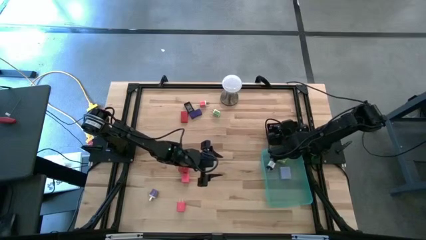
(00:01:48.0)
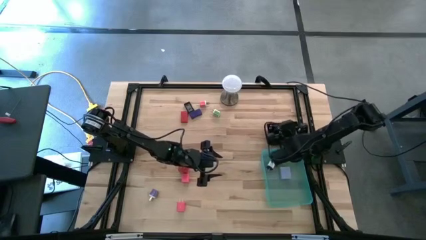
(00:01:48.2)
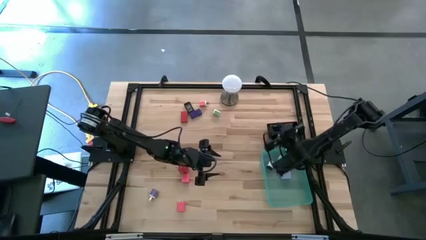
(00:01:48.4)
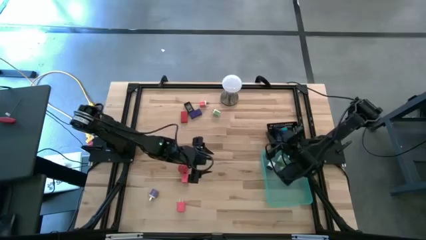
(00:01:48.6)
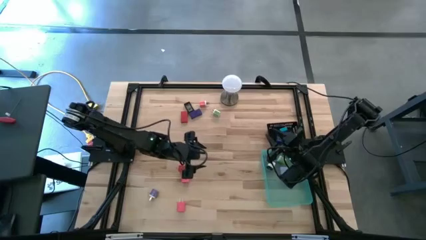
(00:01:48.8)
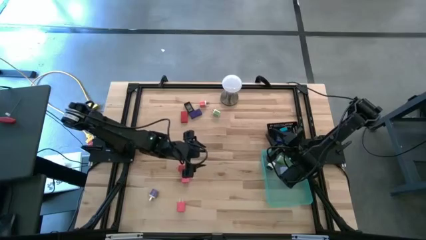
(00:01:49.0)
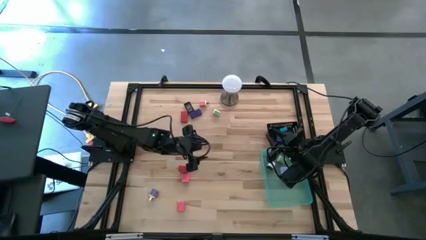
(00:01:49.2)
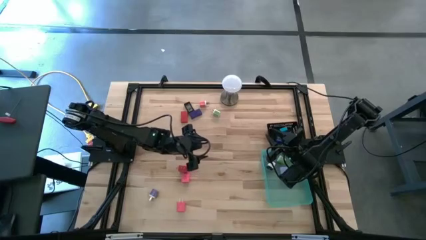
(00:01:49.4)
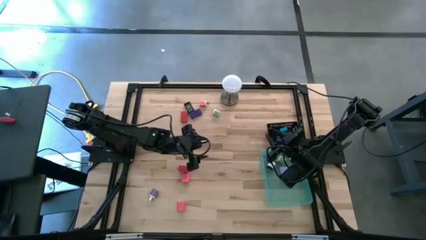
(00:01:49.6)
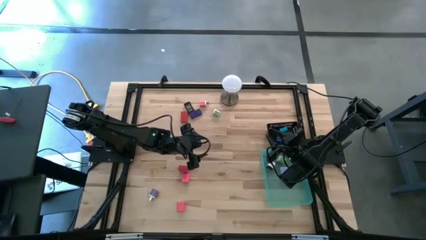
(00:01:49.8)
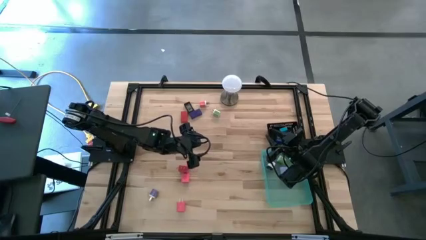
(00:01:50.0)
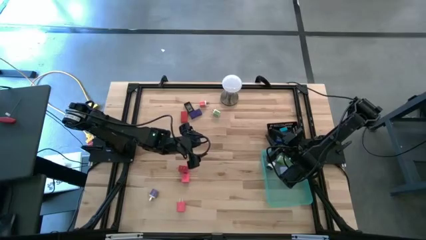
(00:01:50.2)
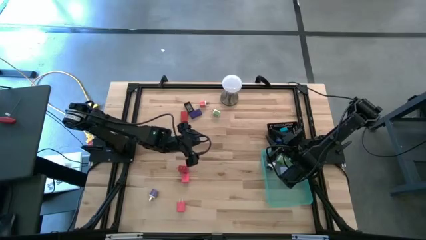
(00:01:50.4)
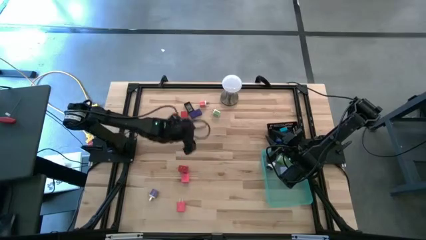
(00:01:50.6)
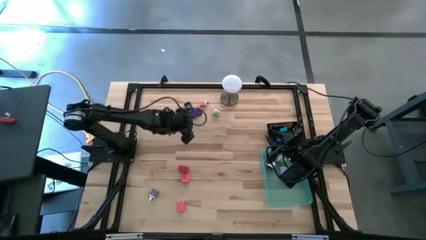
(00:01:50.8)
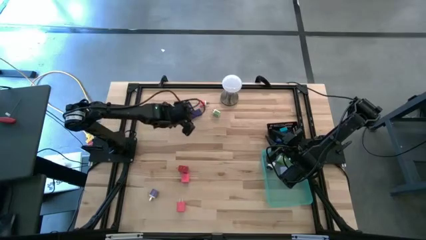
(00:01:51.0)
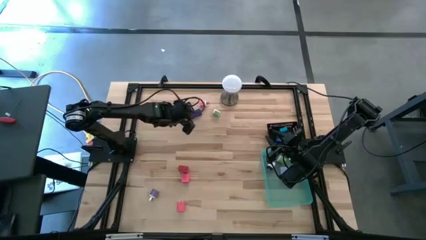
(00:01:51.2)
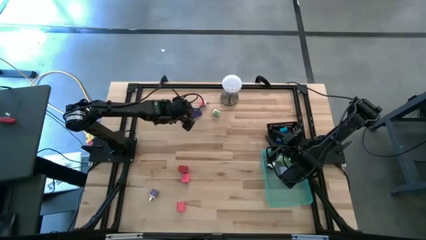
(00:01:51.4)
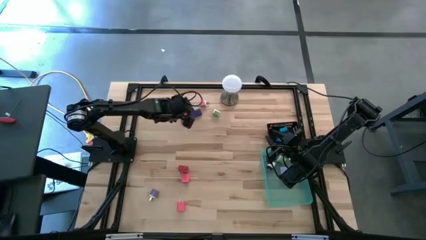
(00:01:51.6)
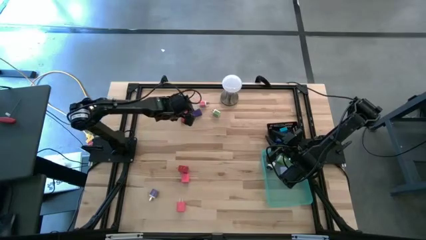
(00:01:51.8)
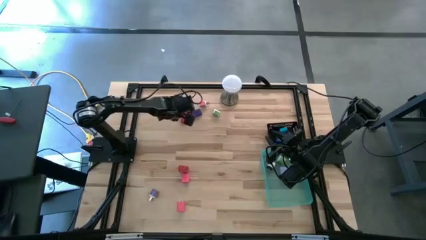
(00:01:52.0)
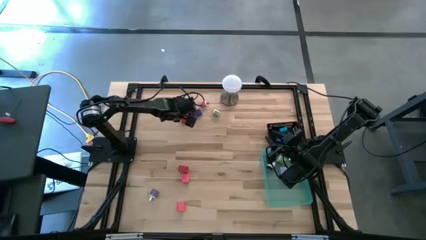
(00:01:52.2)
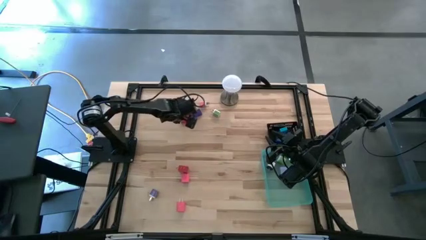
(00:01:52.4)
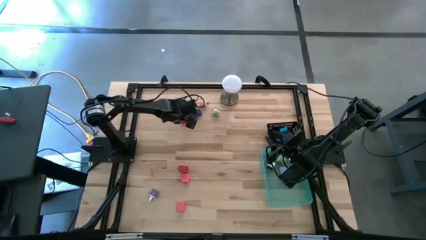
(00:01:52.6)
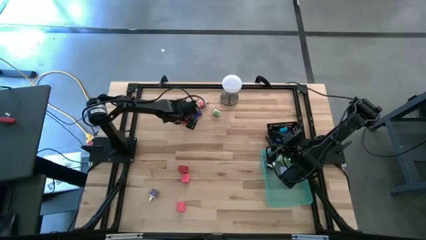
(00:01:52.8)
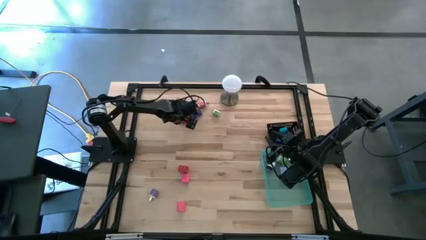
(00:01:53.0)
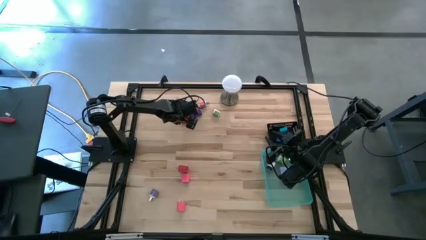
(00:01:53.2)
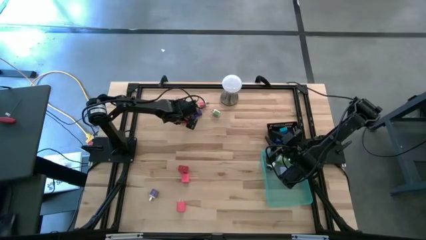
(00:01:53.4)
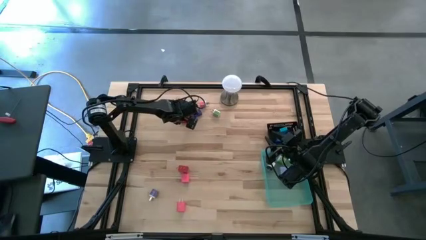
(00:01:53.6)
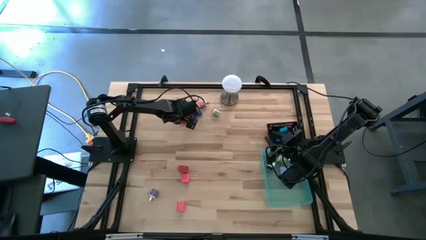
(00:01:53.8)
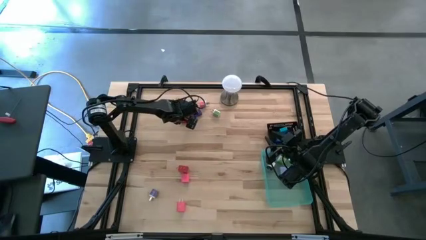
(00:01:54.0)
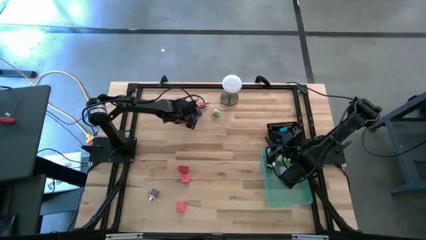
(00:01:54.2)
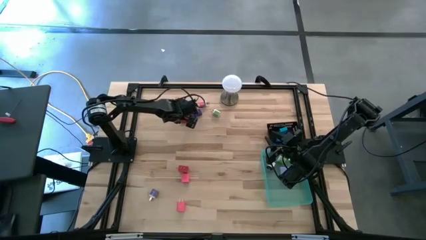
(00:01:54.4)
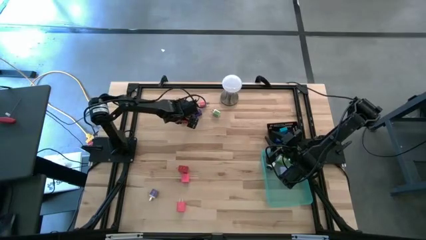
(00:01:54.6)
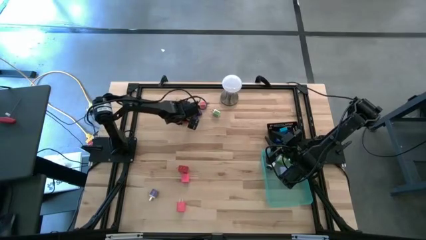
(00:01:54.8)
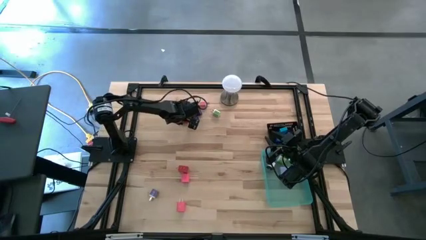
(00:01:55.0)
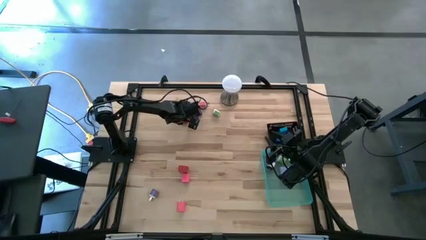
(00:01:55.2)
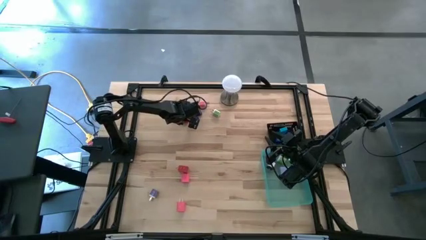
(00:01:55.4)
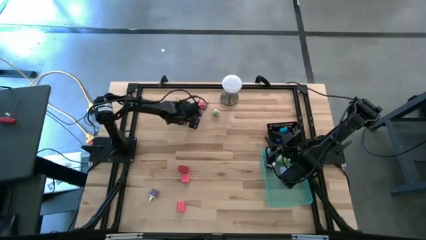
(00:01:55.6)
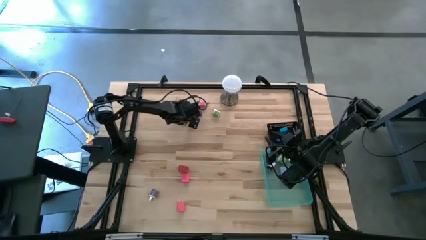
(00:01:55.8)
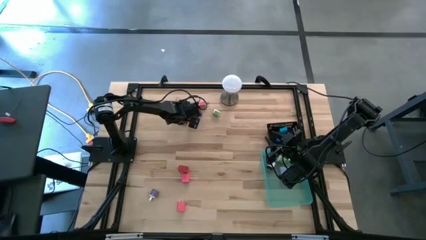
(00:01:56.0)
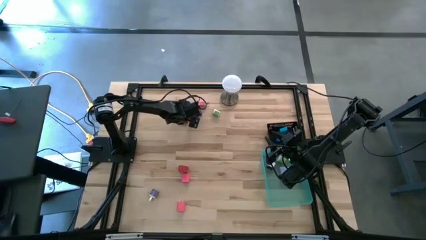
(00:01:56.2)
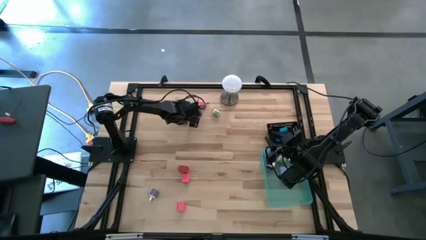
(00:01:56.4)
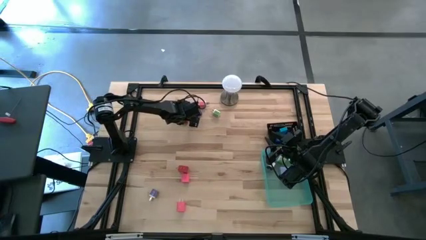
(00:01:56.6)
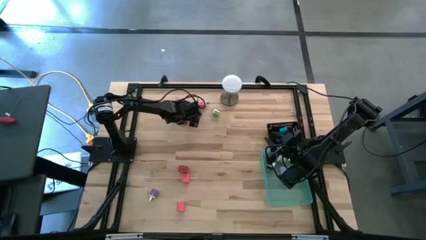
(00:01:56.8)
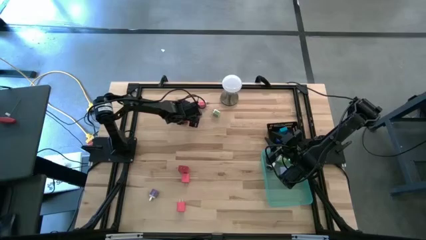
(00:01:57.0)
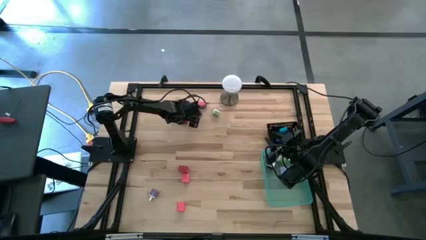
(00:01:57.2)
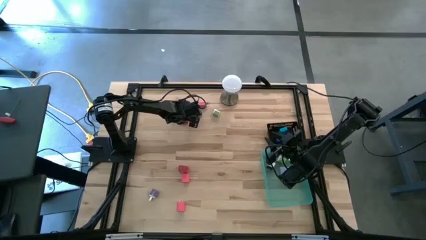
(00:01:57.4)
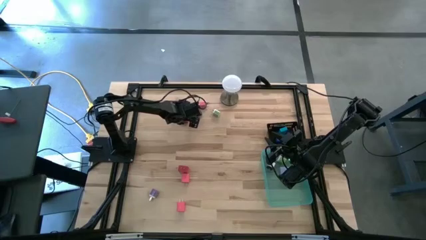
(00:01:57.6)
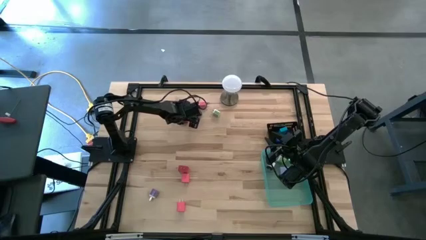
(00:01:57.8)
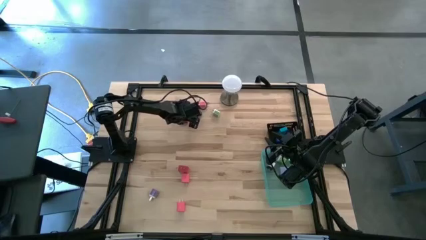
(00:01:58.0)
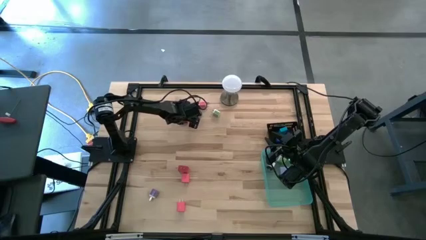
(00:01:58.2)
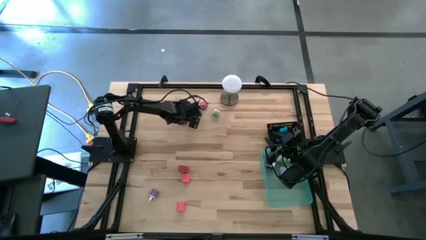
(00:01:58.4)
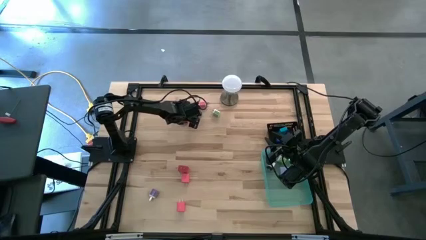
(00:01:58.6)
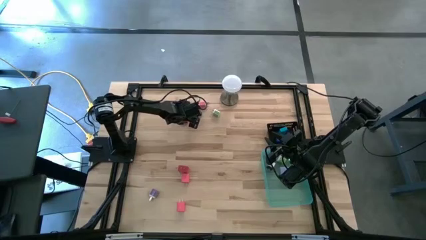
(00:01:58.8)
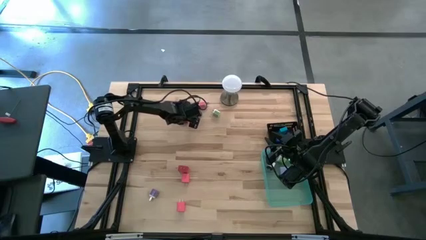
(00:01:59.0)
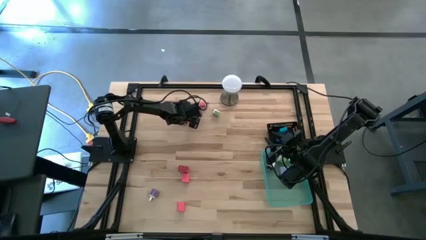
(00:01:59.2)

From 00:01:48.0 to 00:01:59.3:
Task: Pick & Place Office items
Put the red digital clock into the black basket

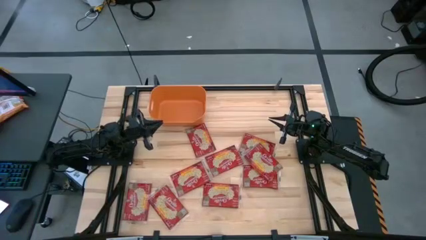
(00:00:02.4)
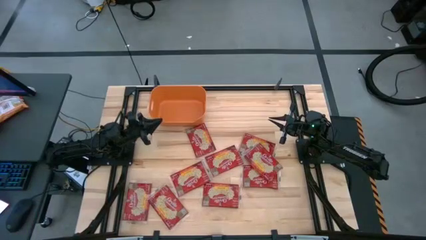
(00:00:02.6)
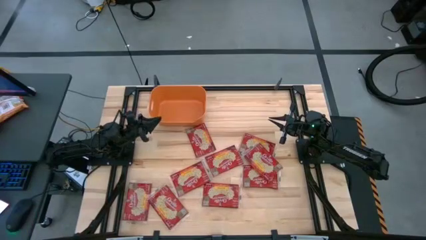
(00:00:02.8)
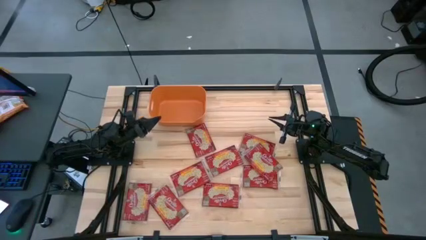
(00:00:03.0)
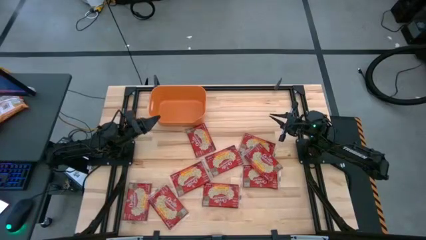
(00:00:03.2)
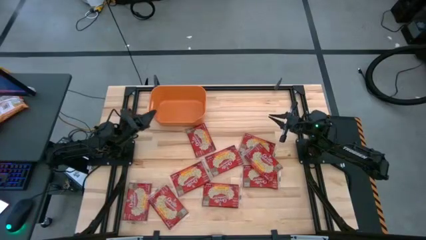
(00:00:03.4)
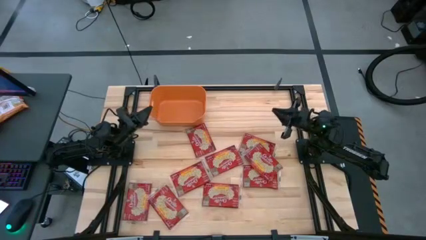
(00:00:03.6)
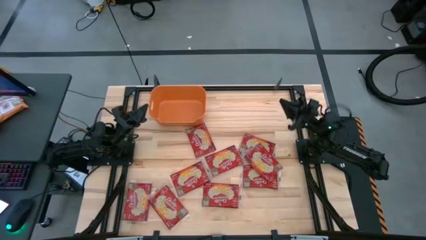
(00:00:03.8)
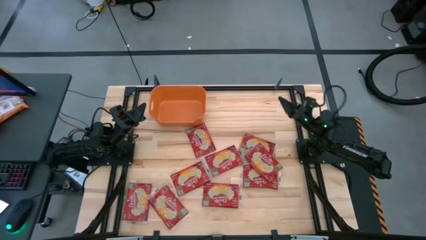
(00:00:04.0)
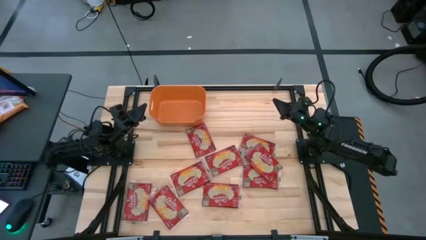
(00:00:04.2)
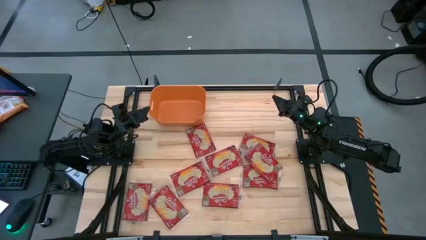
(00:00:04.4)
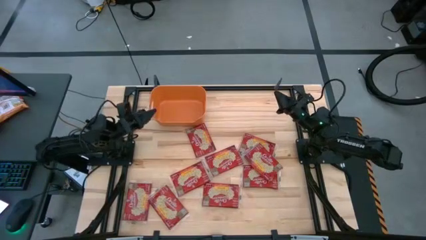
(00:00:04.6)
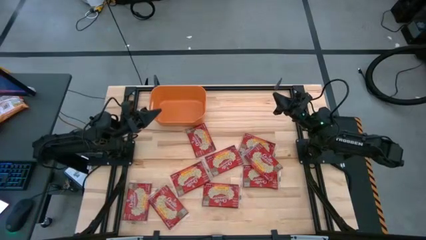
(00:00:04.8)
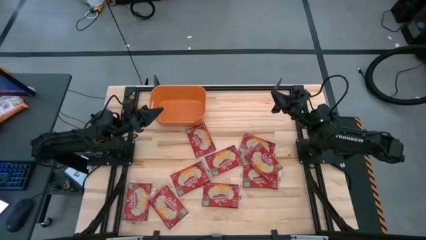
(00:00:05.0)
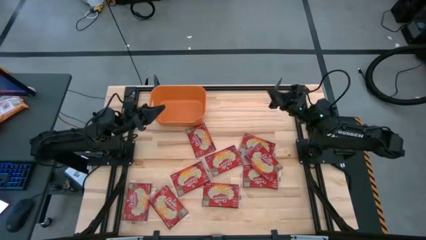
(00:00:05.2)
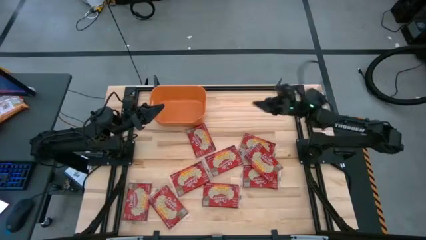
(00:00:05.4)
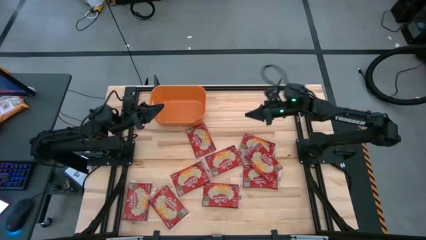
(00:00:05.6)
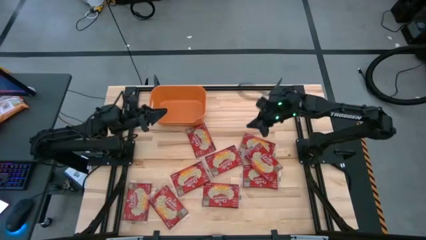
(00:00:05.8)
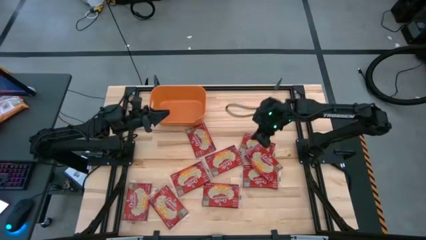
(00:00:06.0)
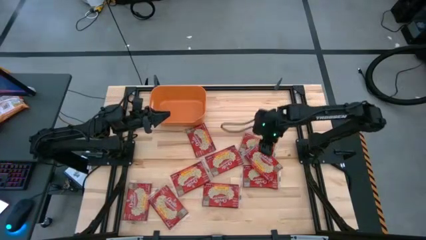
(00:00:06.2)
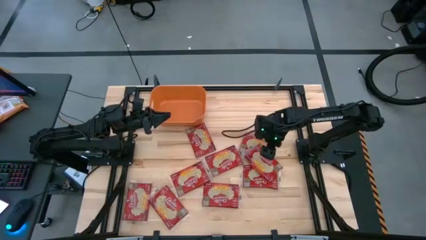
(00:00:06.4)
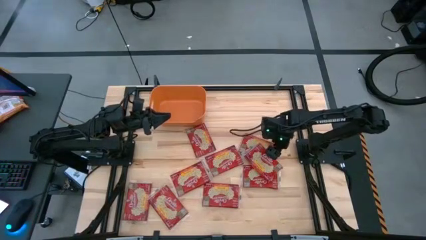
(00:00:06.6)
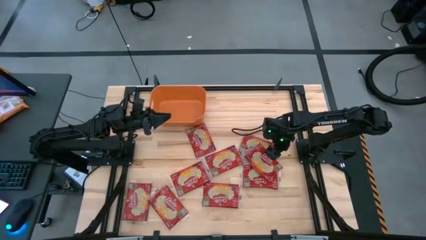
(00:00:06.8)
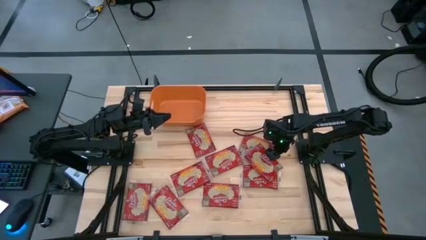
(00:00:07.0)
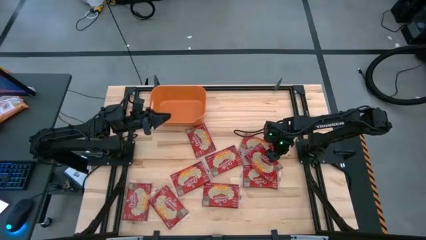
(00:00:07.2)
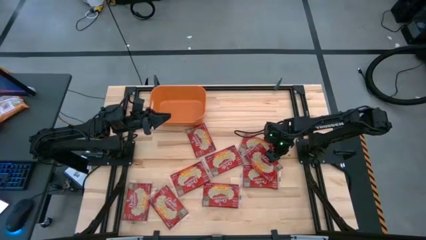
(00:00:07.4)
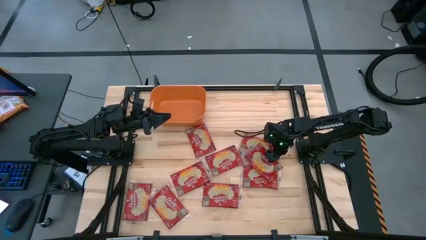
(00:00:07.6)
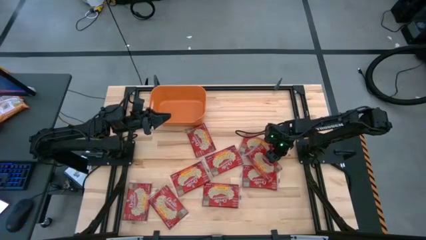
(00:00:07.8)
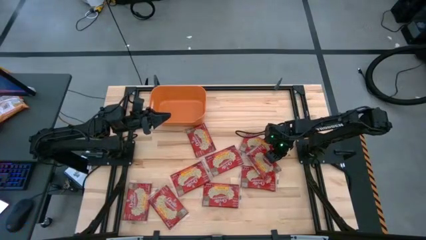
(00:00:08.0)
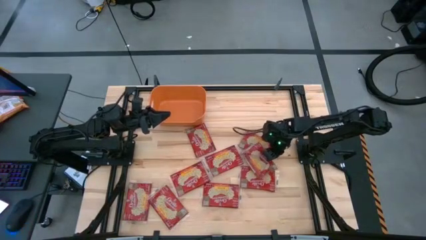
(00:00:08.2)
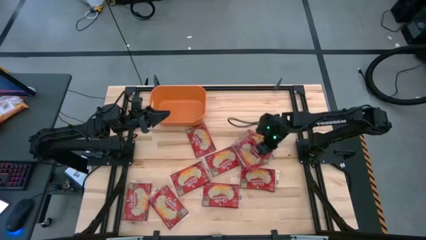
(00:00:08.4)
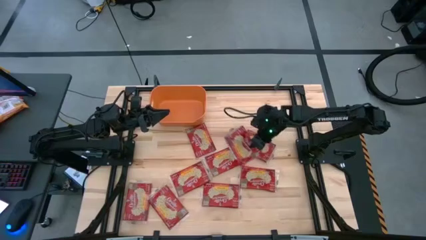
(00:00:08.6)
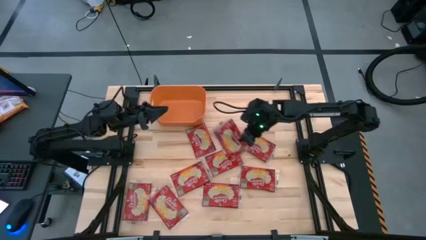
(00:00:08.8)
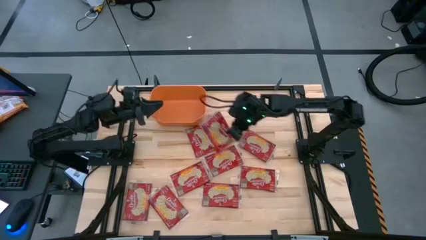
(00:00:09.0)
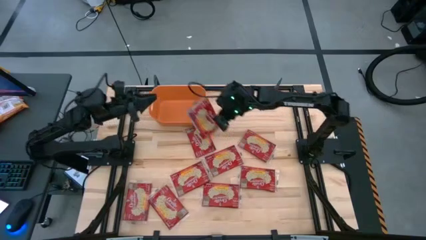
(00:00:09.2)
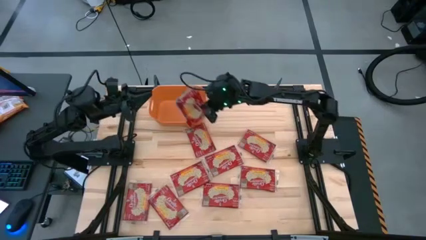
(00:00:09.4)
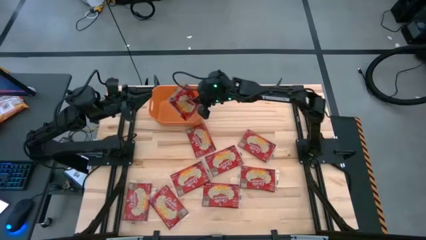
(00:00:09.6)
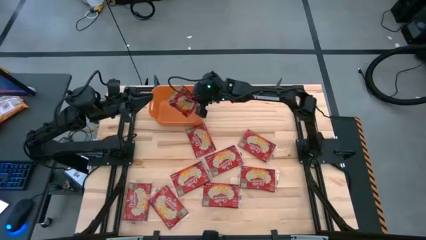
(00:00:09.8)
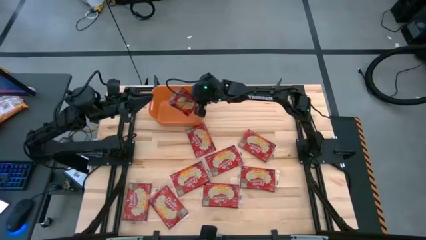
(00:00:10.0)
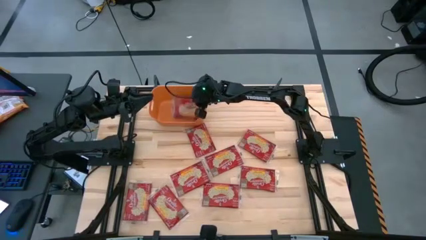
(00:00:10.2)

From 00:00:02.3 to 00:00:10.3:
Task: Sort popcorn bags into baskets
Put the red popcorn bag into the orange bin
